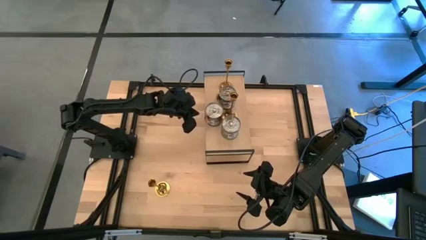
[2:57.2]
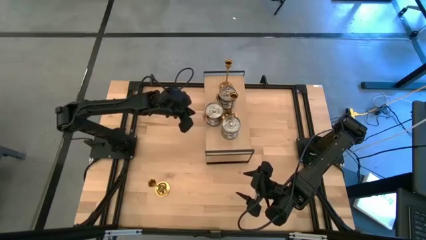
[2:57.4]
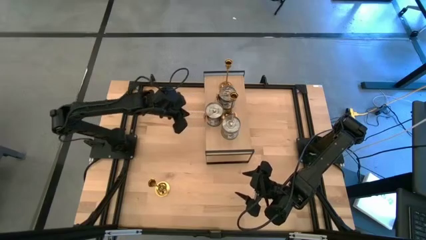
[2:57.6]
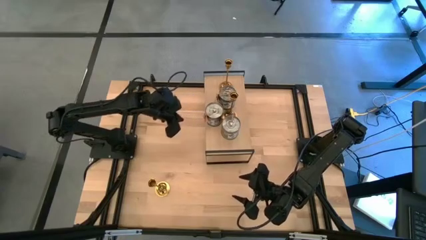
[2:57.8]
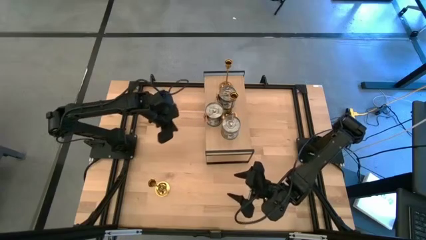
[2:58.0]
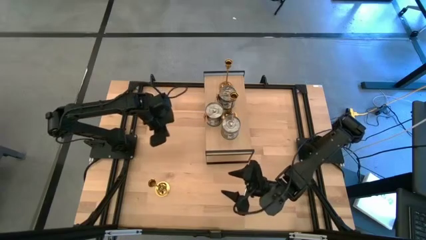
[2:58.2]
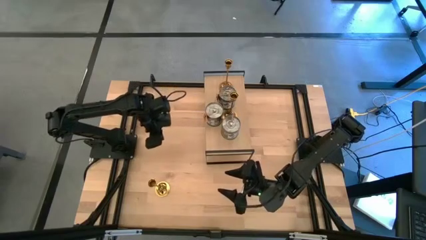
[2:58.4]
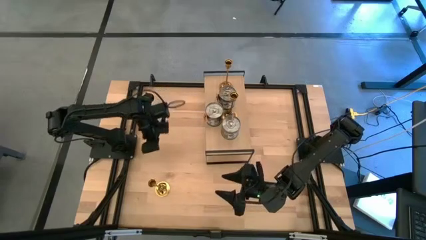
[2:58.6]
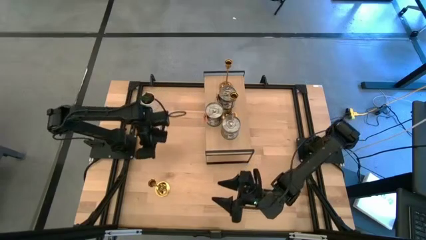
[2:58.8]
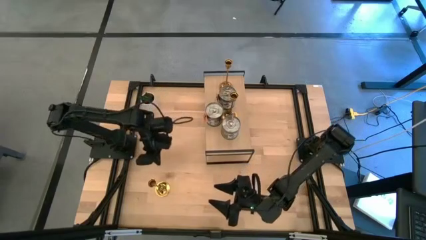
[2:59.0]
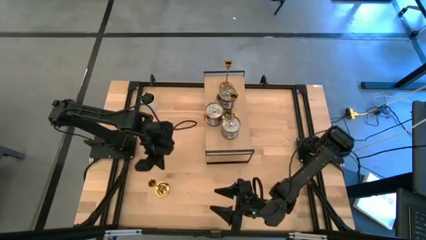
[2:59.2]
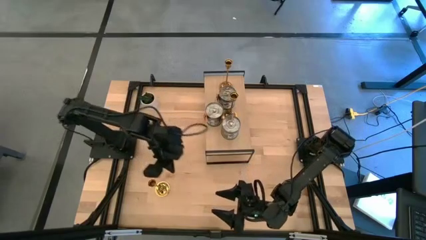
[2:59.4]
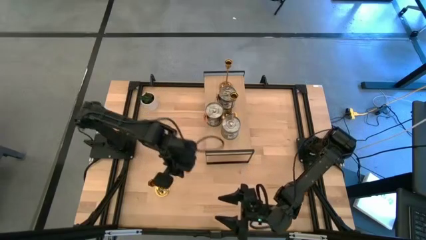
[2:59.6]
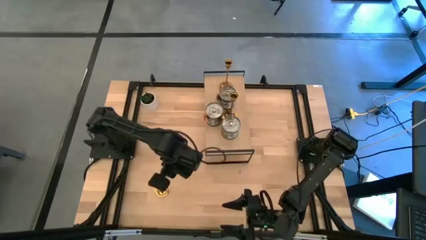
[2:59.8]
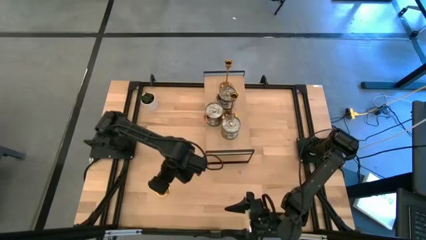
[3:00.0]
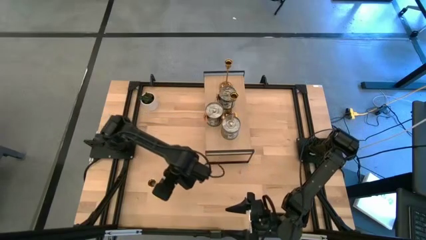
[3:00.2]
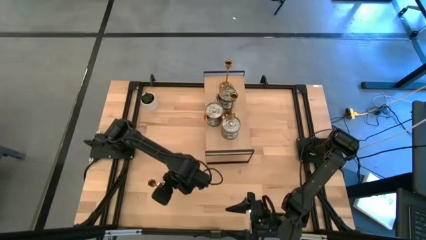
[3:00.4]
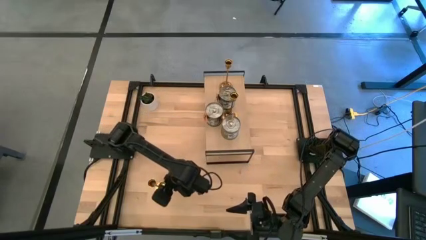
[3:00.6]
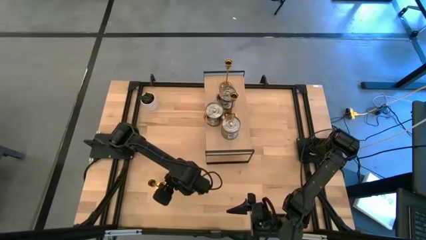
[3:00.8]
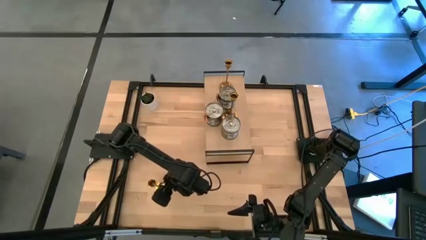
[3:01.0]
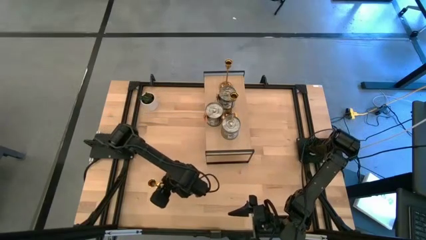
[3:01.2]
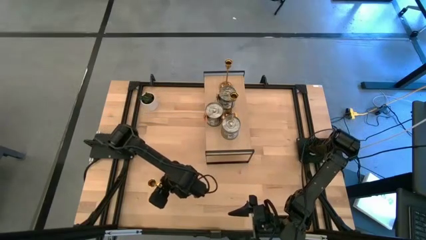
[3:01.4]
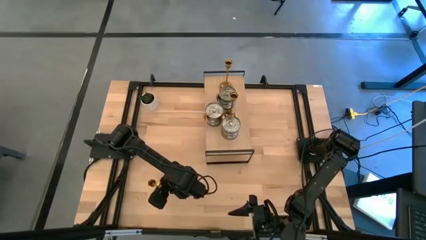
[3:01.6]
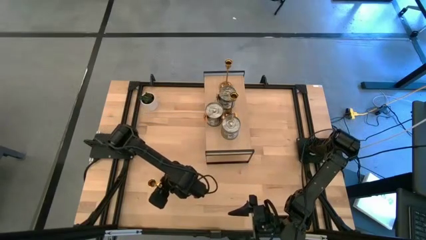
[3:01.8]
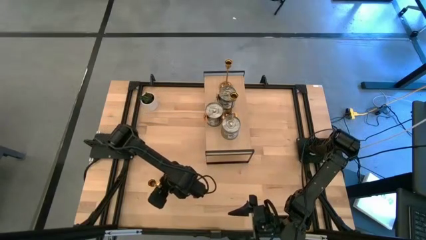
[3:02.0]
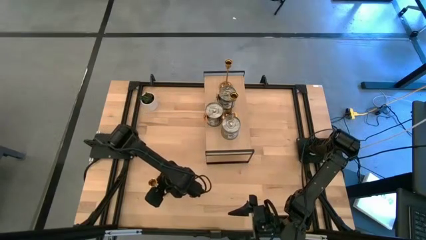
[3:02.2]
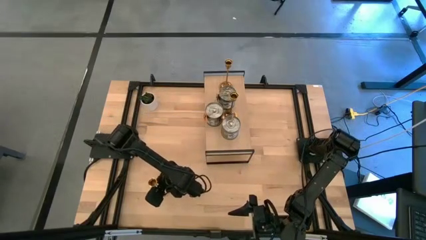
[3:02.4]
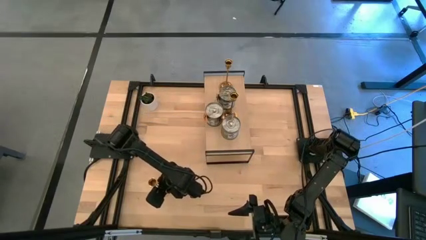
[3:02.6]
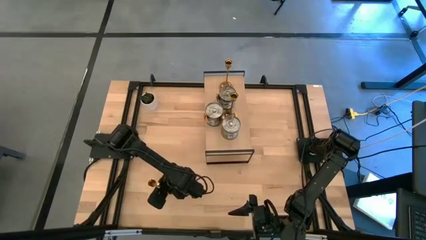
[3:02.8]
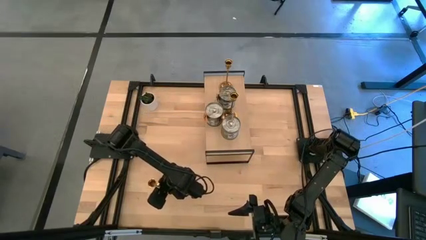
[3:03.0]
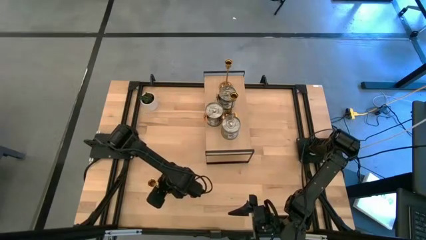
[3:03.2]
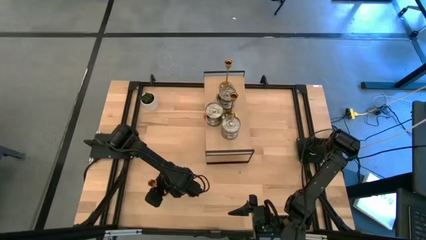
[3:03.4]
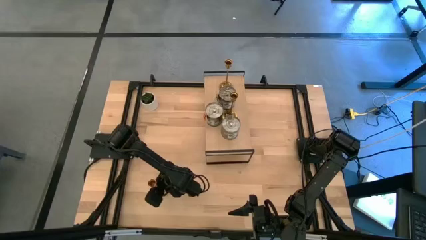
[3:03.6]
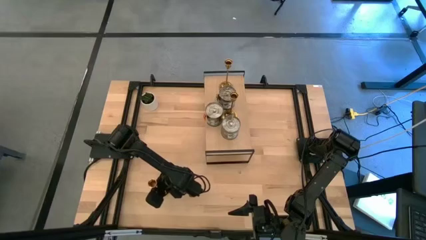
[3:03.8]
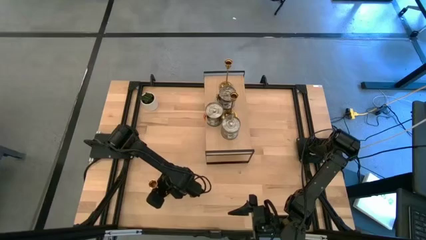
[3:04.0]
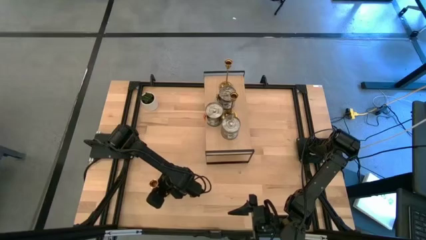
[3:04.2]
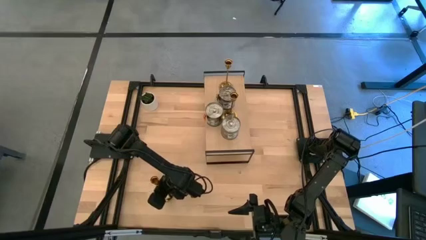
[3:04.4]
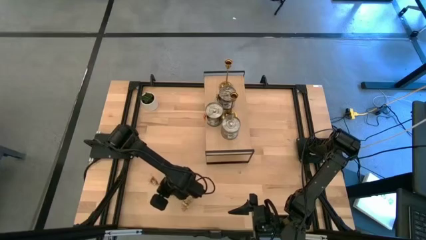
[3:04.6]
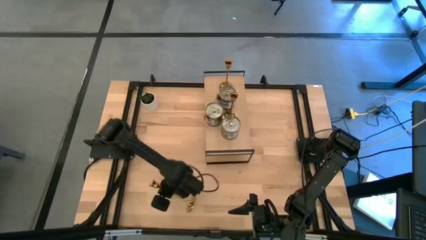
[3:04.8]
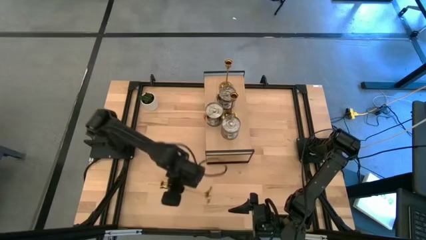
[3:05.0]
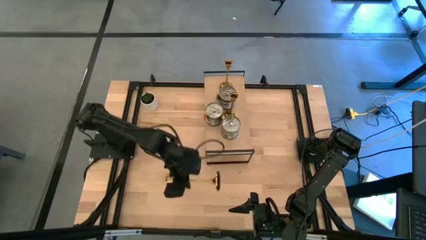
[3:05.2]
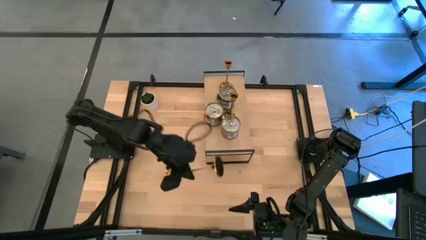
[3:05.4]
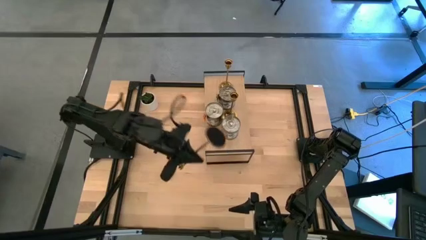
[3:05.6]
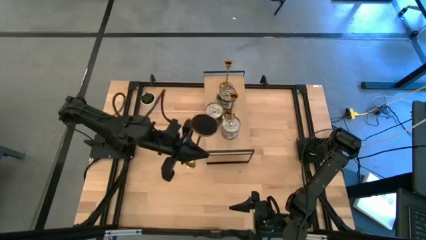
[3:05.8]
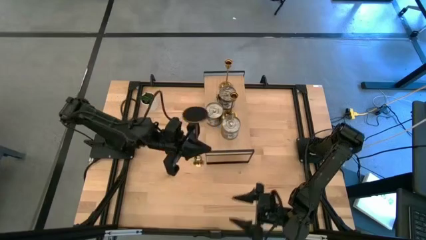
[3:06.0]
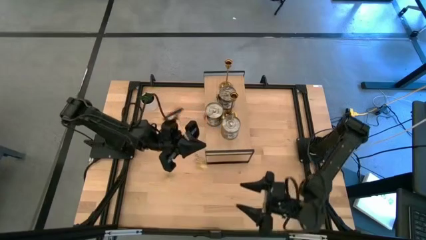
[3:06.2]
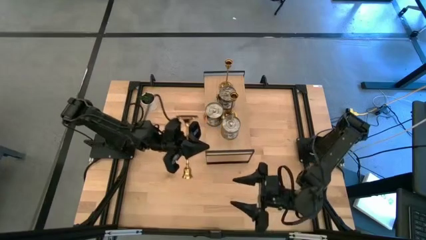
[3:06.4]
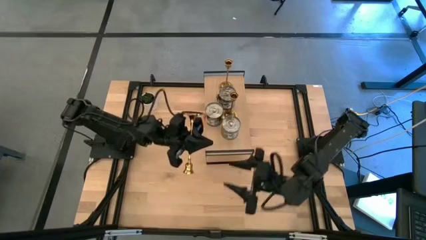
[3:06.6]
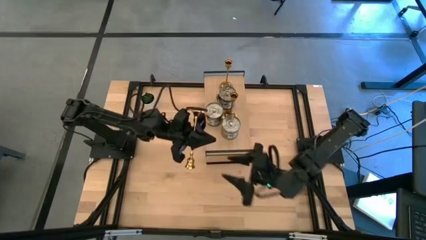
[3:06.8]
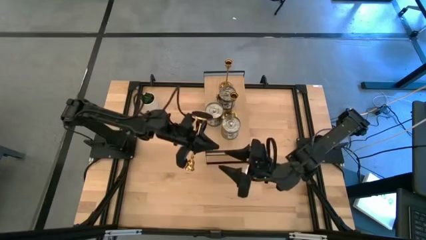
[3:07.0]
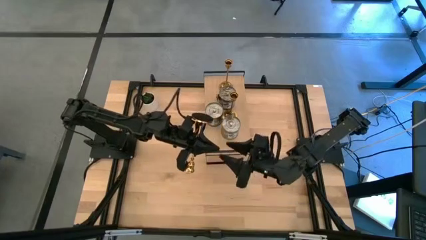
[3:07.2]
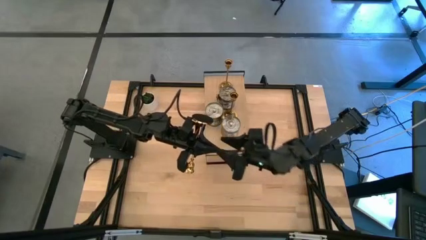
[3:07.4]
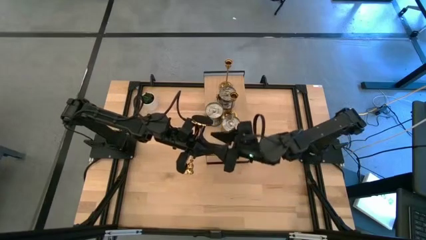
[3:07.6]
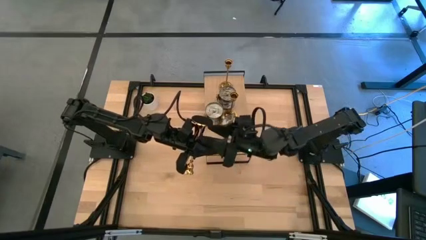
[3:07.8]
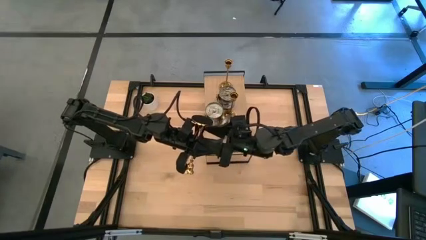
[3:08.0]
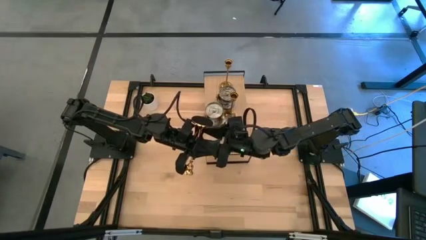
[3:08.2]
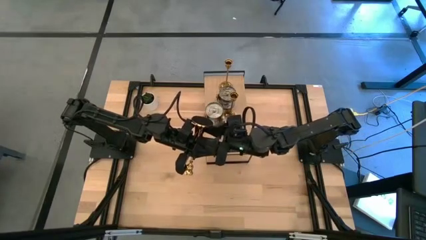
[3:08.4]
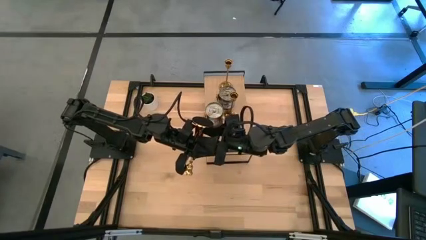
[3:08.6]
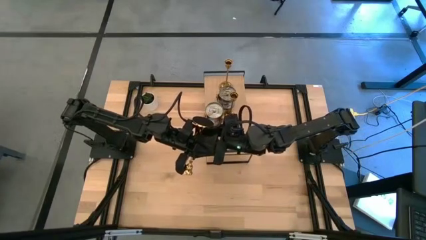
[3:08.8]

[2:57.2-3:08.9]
Task: Pick & Place candle stick holders
Put the gold candle holder on the shelf

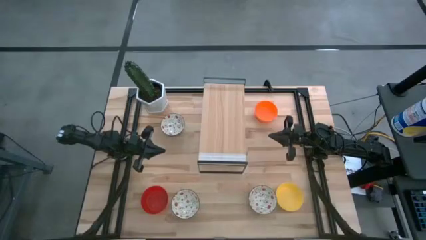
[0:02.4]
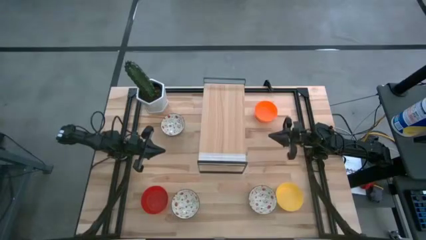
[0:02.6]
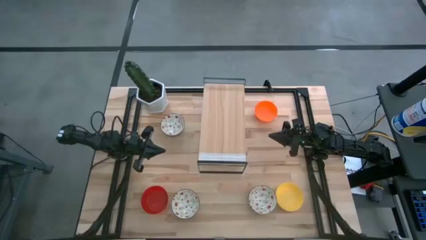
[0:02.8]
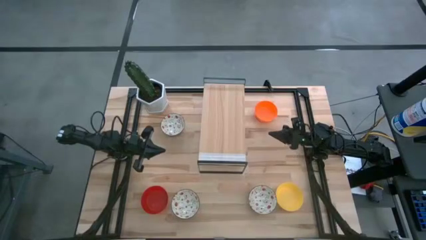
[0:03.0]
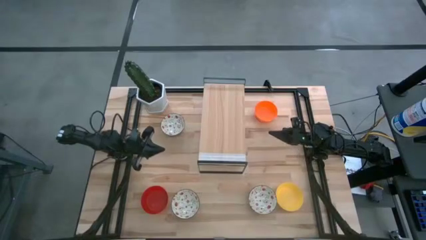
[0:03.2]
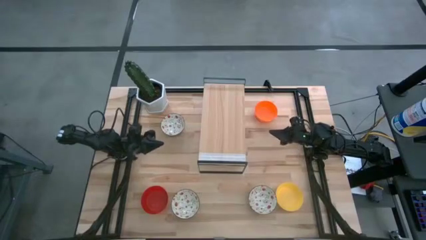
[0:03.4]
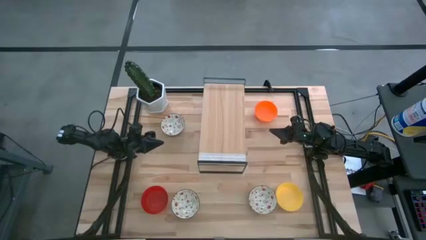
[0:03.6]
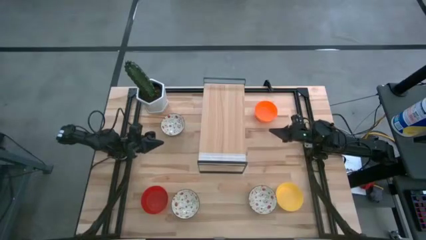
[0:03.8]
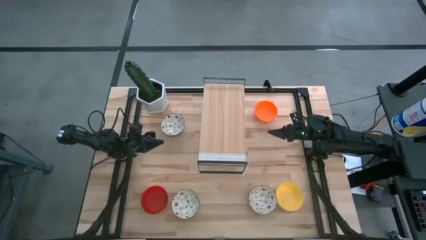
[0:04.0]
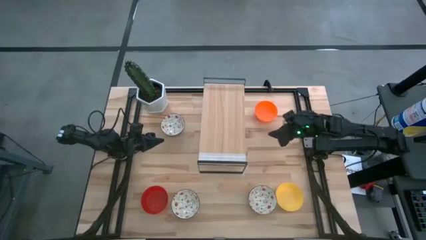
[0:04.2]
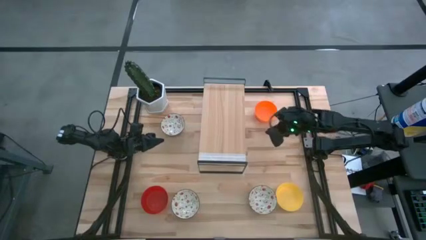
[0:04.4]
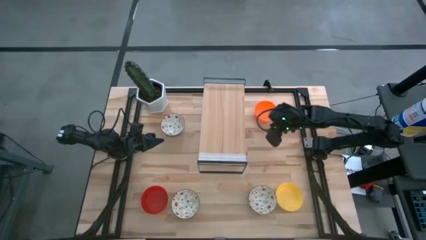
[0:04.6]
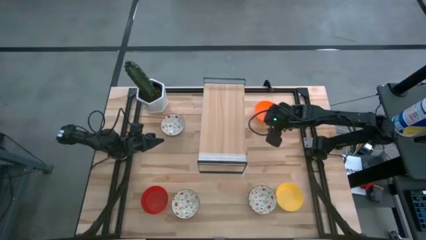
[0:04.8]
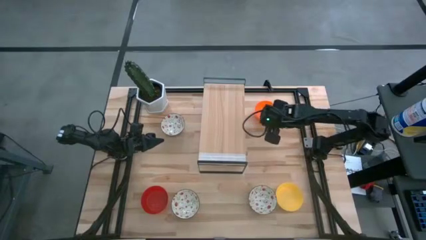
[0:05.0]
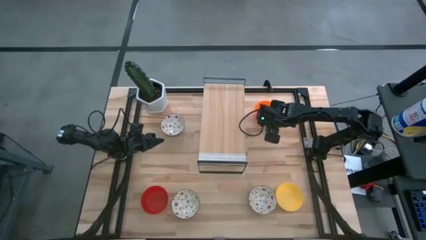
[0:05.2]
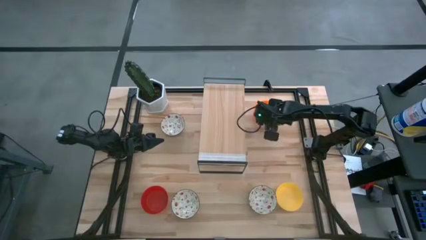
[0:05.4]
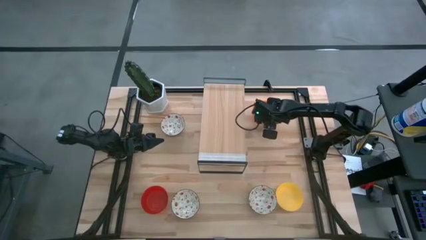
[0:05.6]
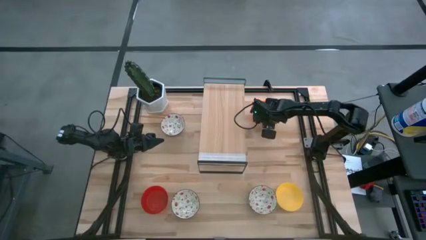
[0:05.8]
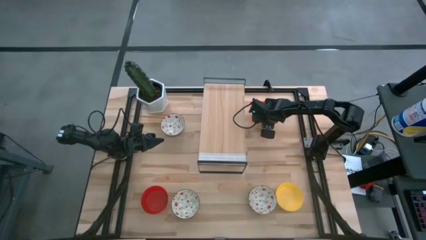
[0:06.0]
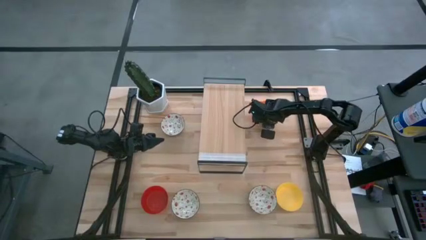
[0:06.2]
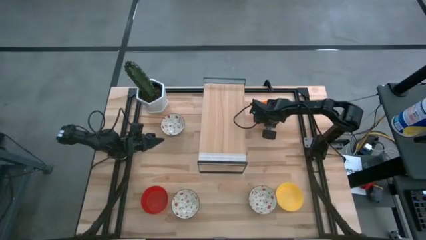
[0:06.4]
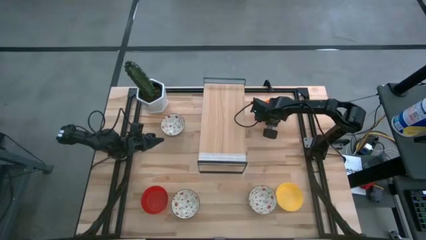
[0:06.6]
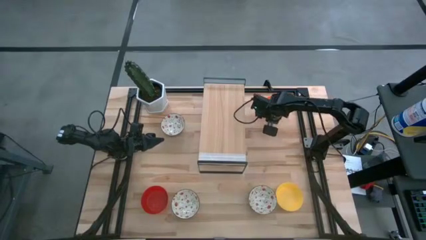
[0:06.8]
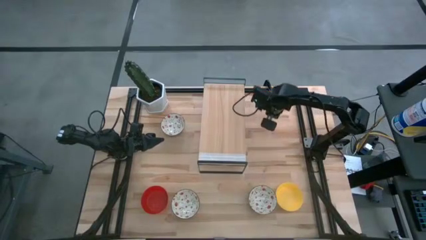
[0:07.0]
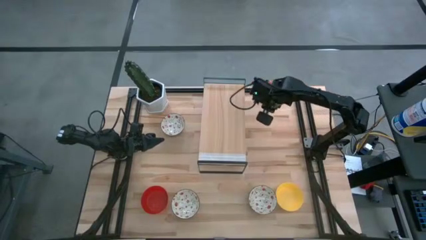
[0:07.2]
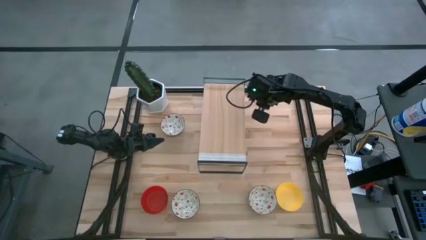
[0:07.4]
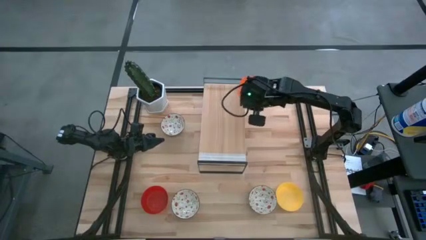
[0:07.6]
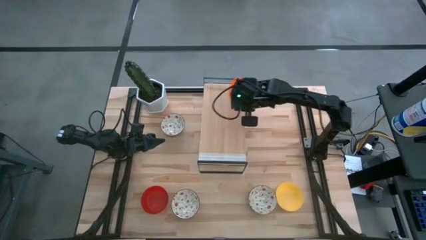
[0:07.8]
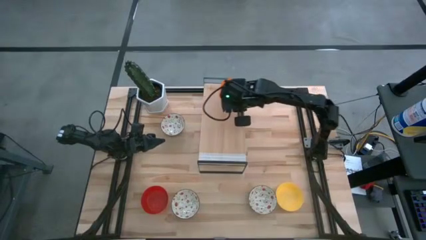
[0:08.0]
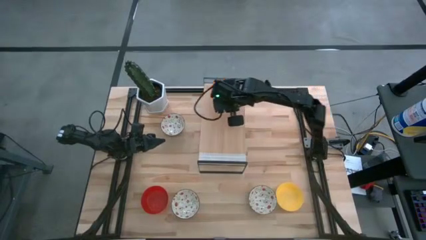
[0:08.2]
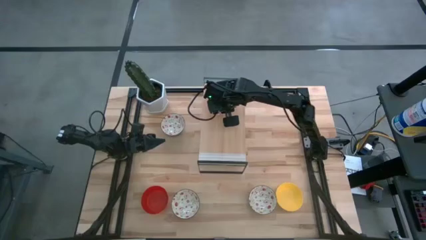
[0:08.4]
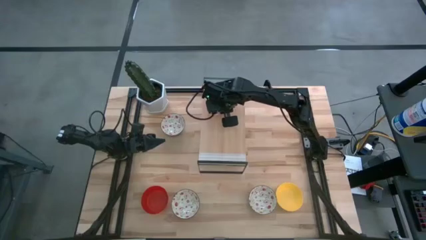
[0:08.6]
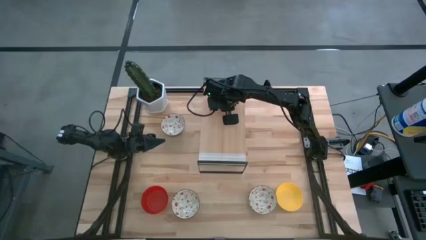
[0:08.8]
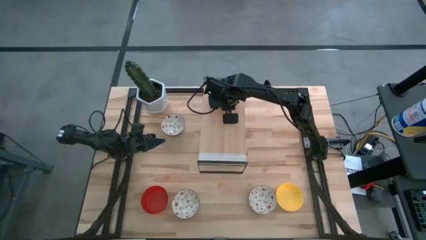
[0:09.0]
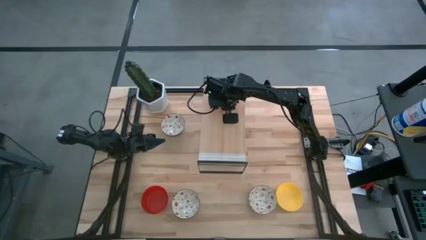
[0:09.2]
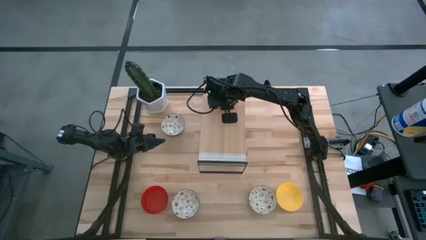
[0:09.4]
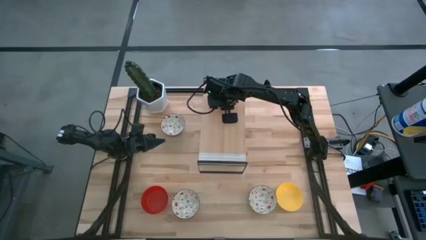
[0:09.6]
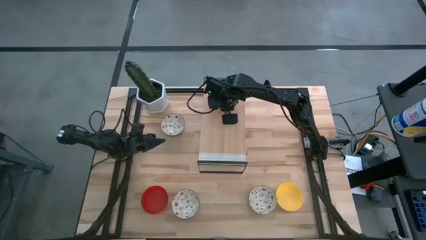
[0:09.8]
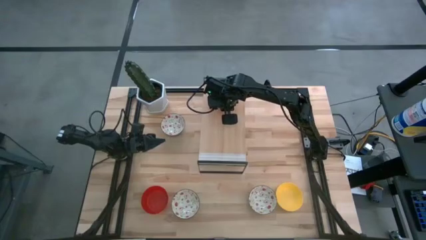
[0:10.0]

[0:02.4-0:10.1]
Task: Pick & Place Mini bowls
Put the light orange bowl on the shelf
